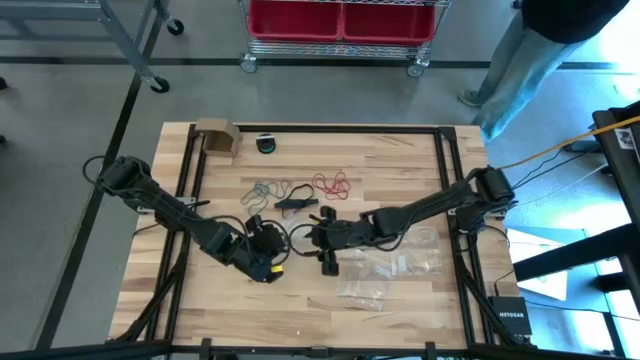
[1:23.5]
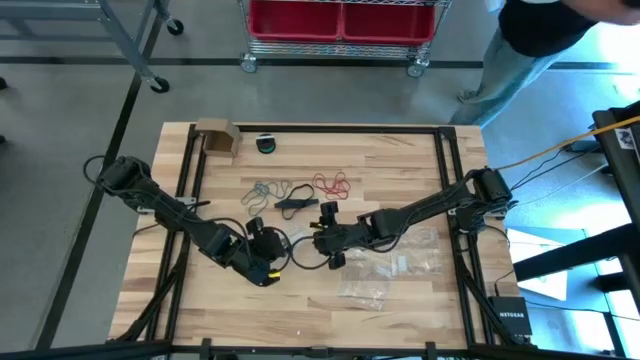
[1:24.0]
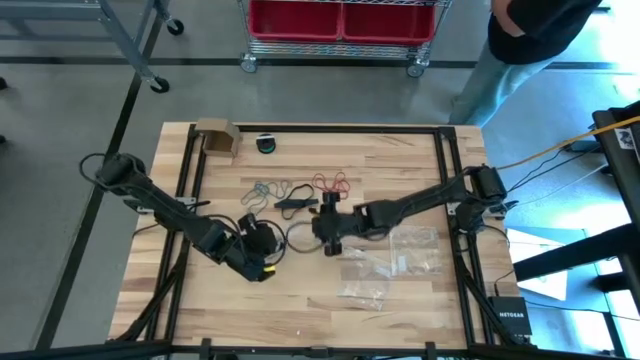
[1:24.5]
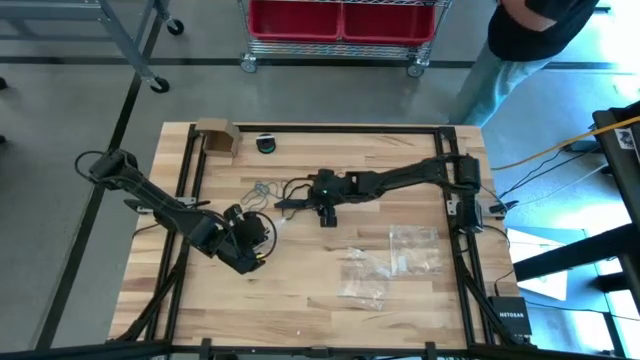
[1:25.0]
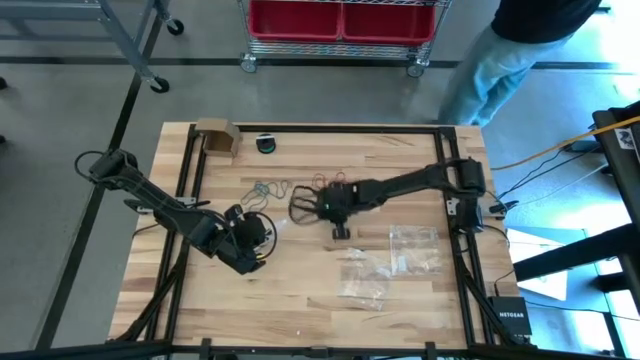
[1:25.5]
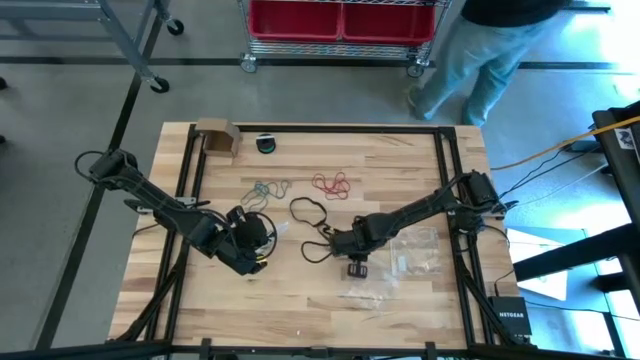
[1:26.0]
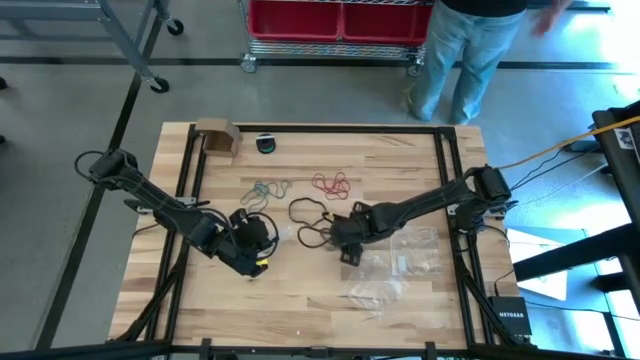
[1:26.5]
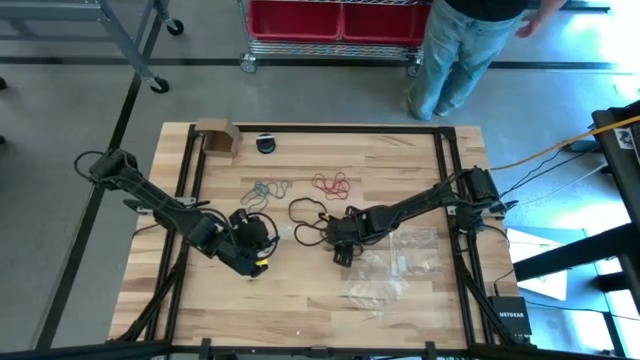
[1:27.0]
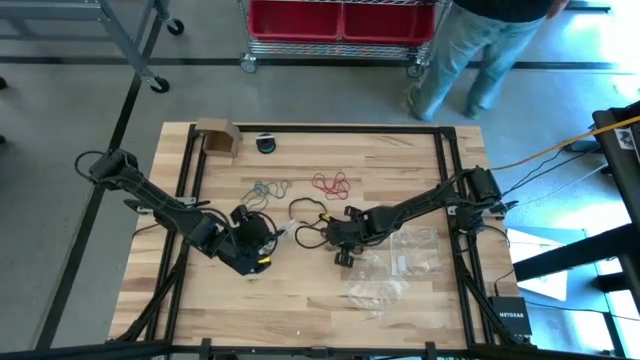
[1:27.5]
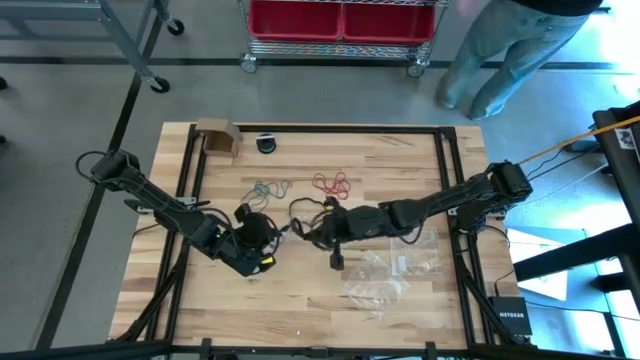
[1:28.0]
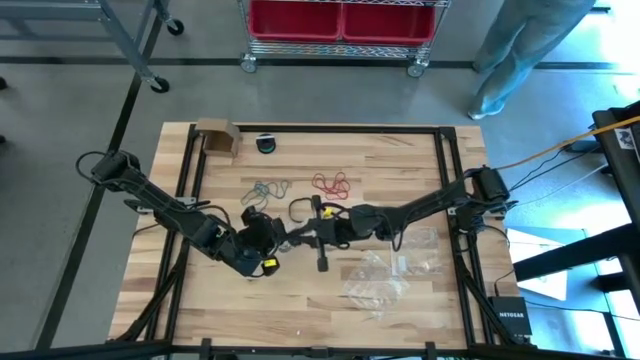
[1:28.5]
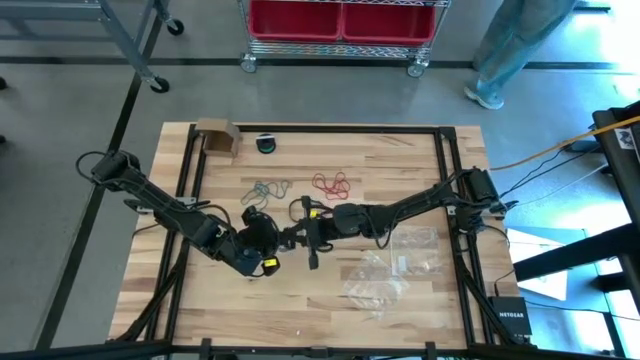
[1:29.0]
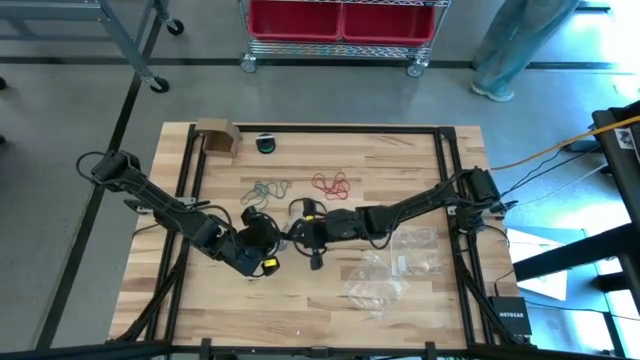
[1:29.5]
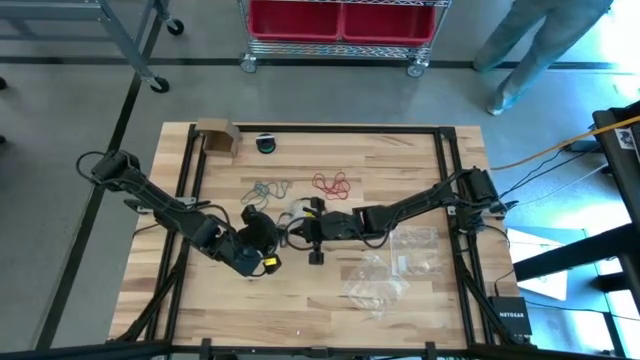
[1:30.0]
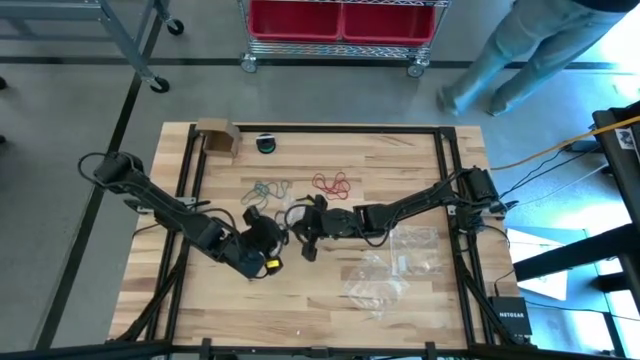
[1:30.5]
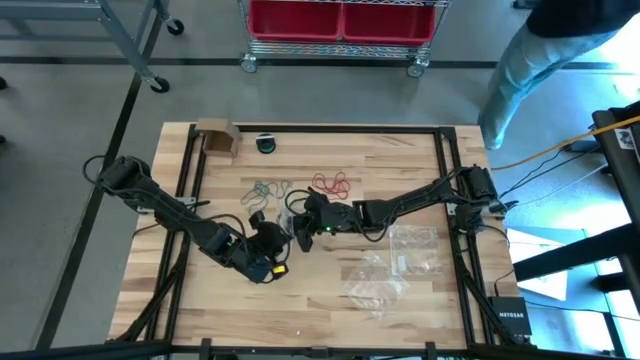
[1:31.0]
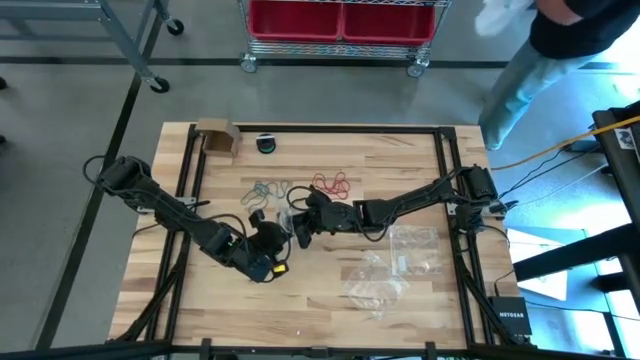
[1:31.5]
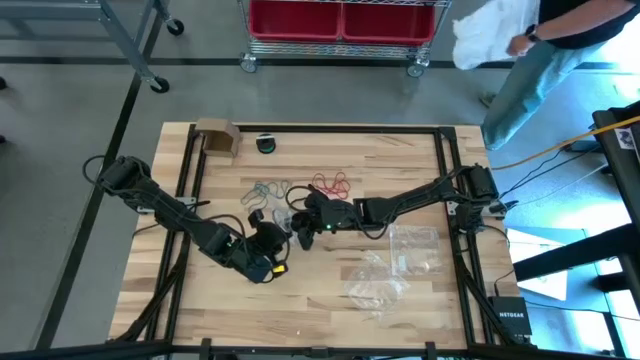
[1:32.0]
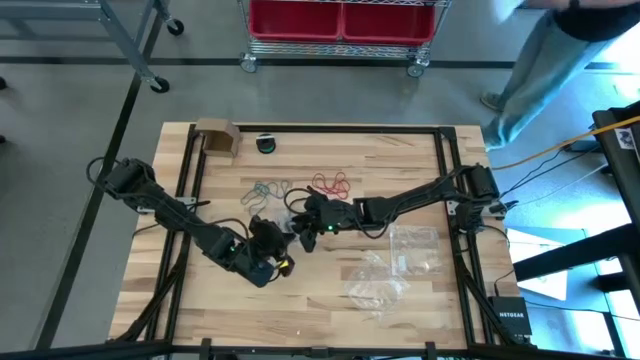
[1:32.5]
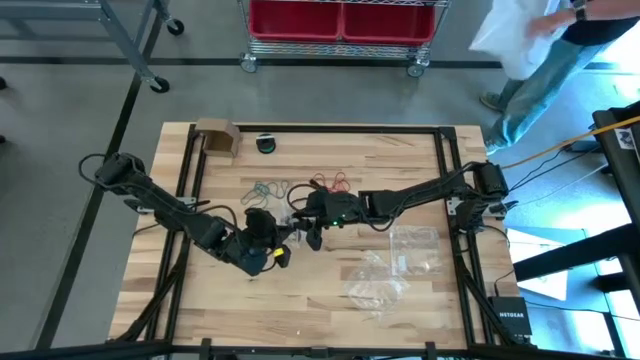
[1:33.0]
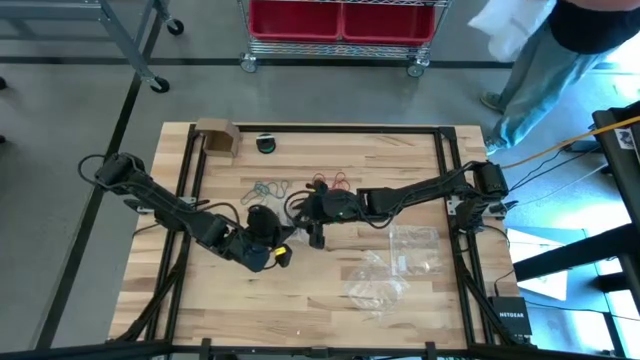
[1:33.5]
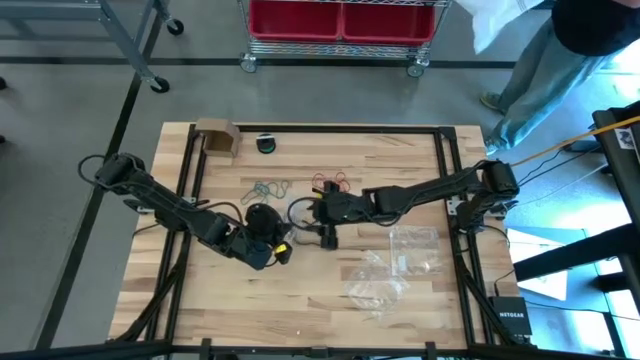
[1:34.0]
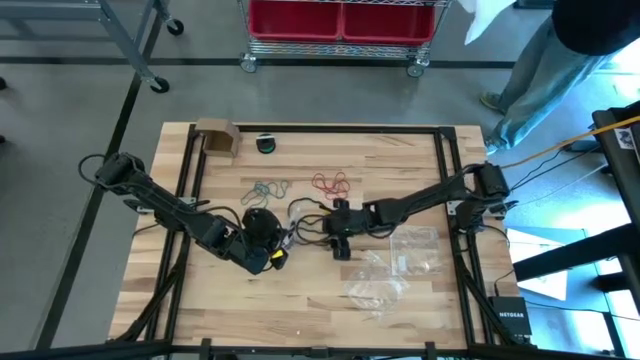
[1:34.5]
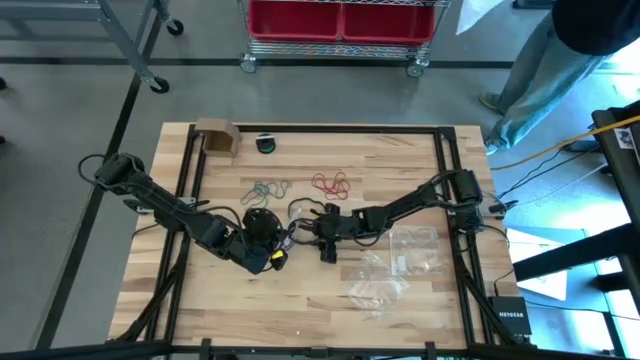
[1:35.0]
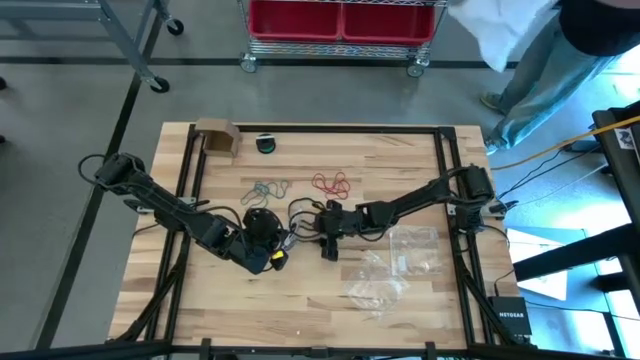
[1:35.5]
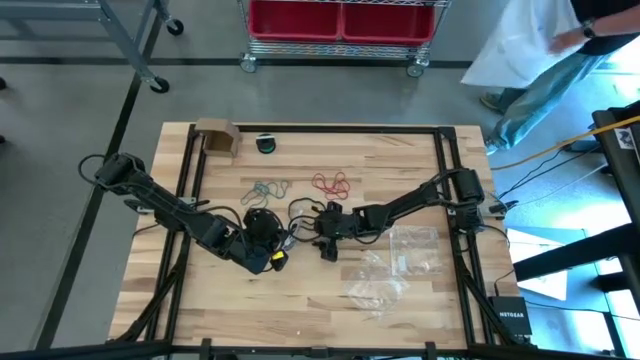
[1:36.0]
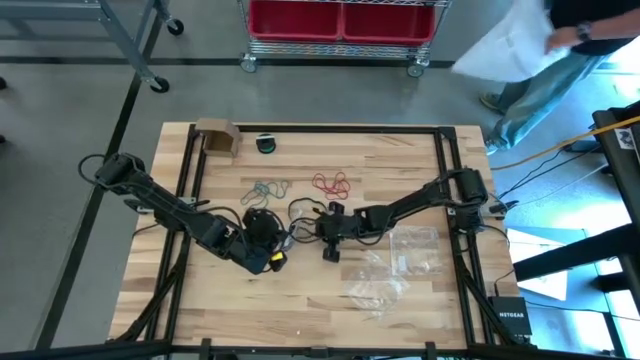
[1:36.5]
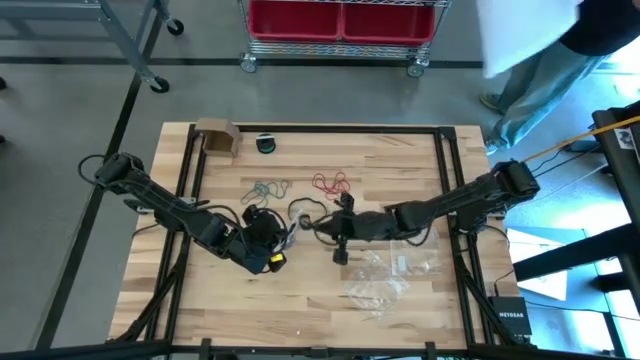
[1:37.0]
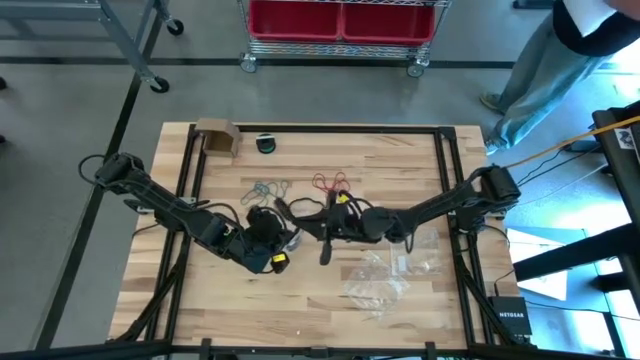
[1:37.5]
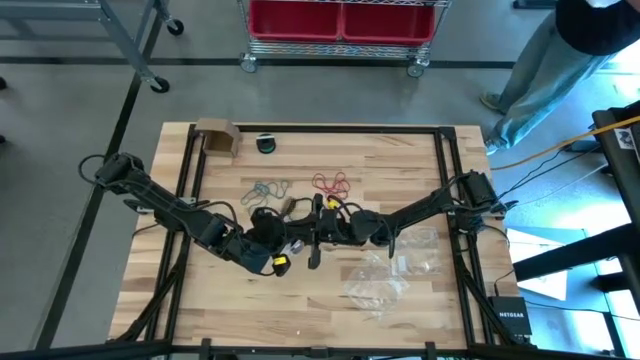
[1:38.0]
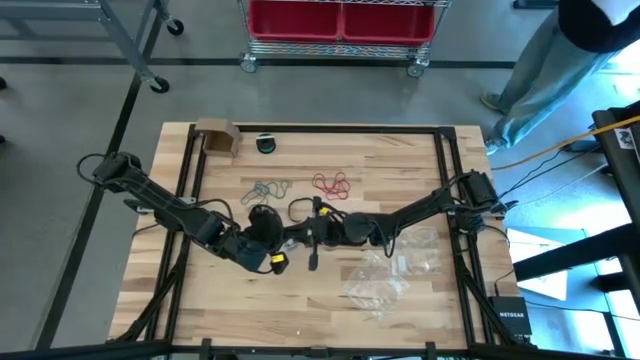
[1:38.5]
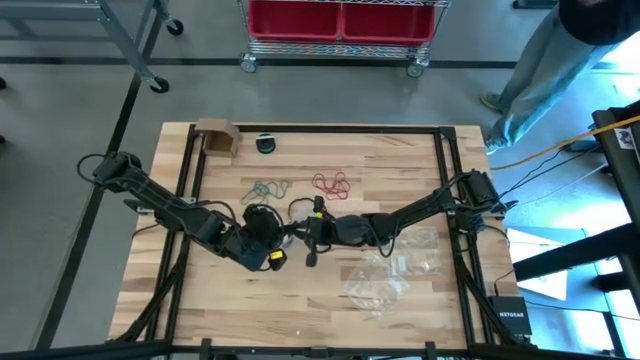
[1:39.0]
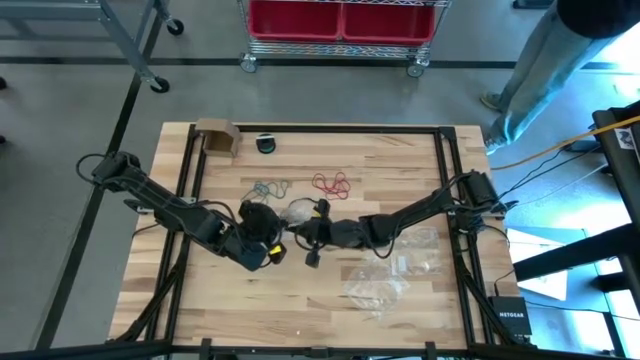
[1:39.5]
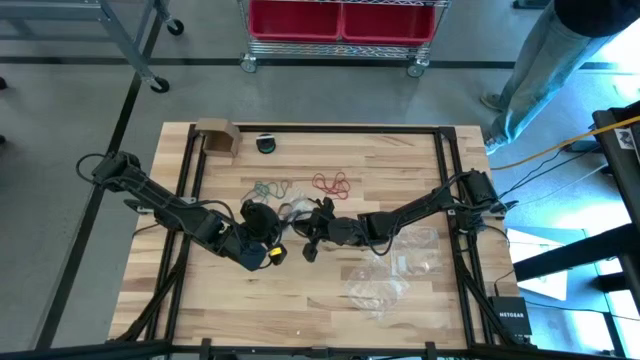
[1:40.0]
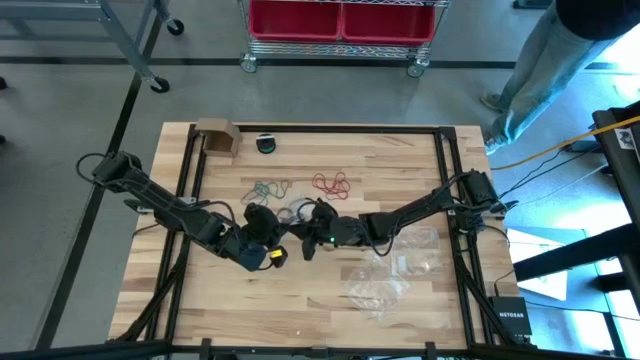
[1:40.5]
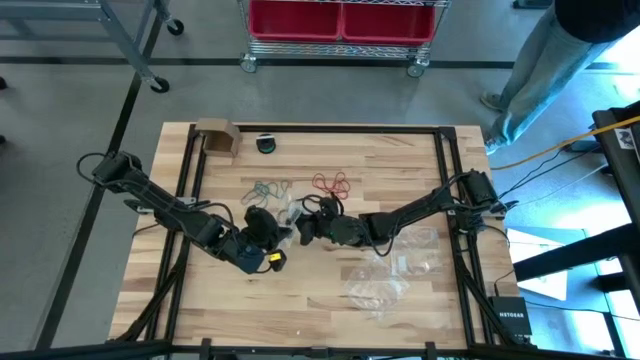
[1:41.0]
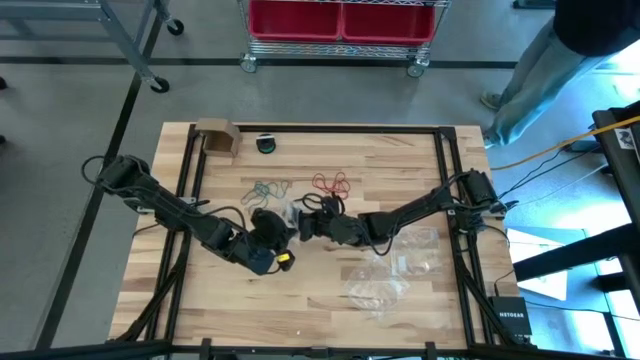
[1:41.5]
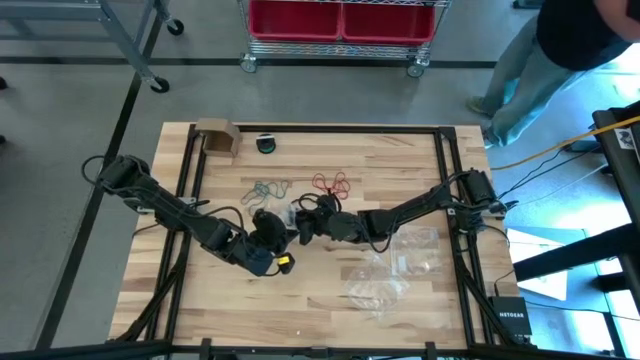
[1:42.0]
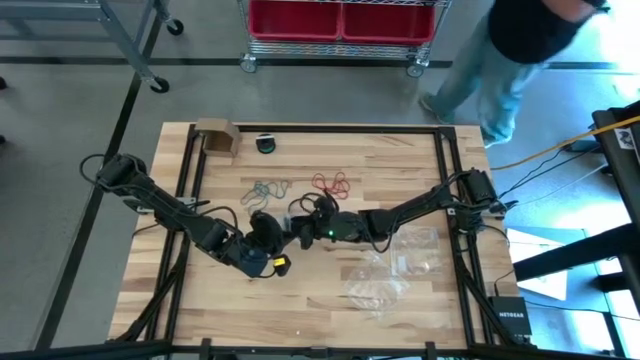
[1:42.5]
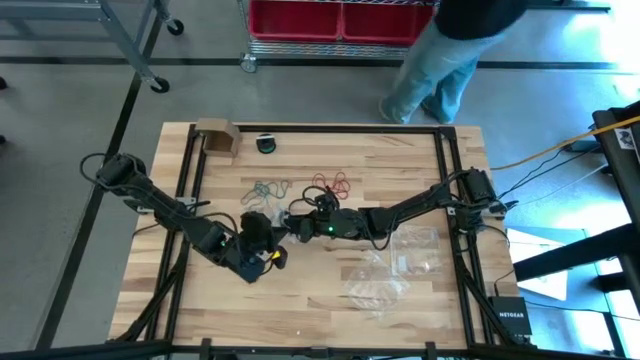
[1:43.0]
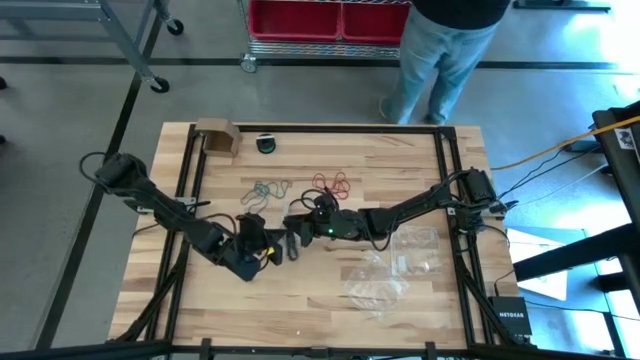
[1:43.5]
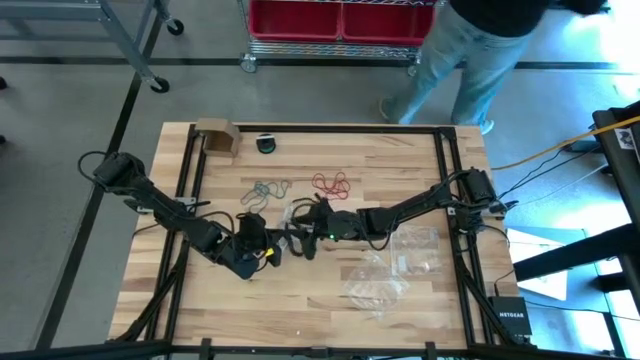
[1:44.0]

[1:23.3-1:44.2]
Task: Sort rubber bands
Put the black rubber band into the transparent zip bag

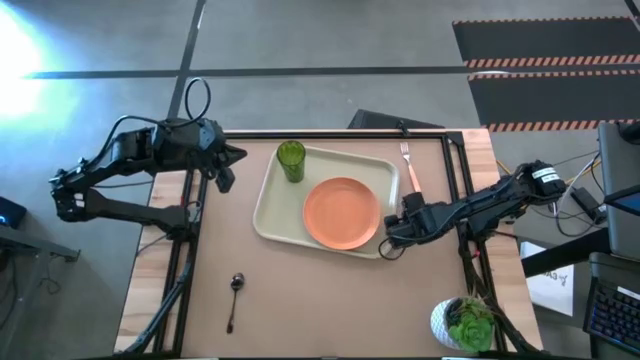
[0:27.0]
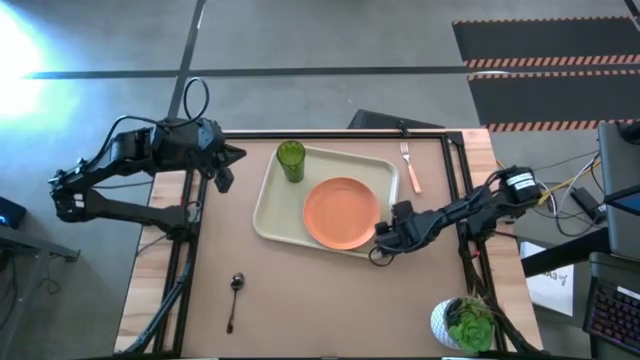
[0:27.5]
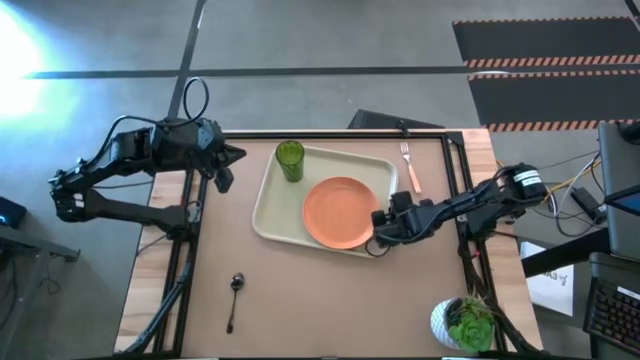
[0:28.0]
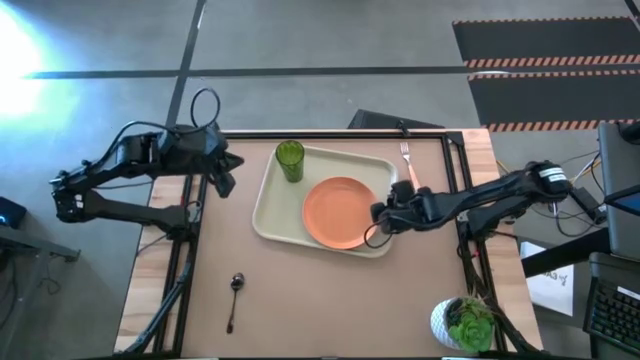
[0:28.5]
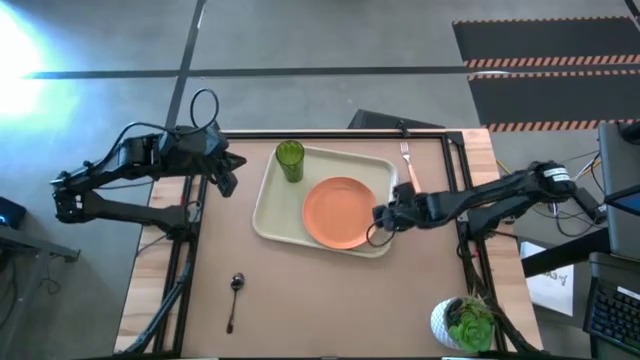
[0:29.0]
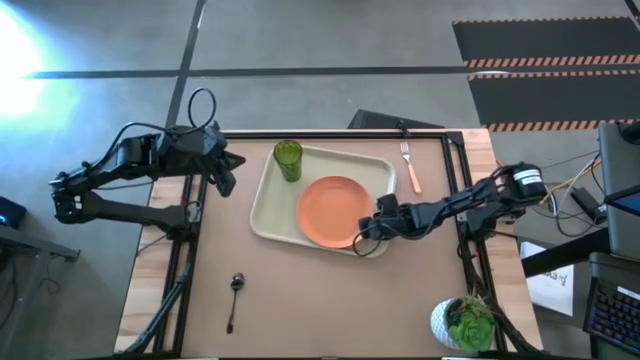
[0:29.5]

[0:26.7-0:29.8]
Task: Pick and place plate/cup/fork/spoon on tray
Adjust the orange plate in the light brown serving tray
